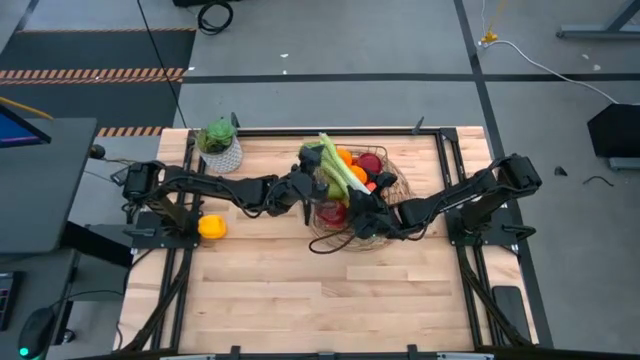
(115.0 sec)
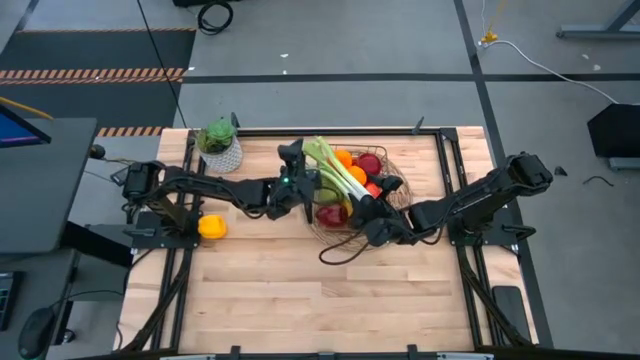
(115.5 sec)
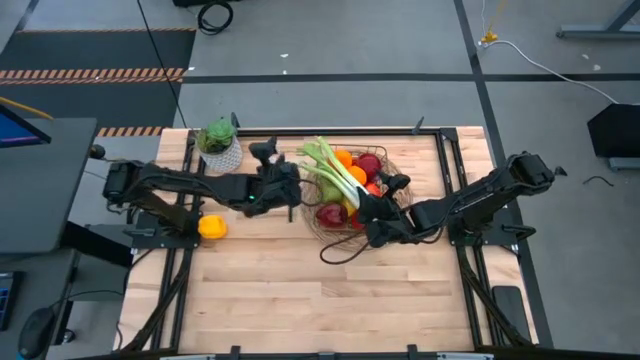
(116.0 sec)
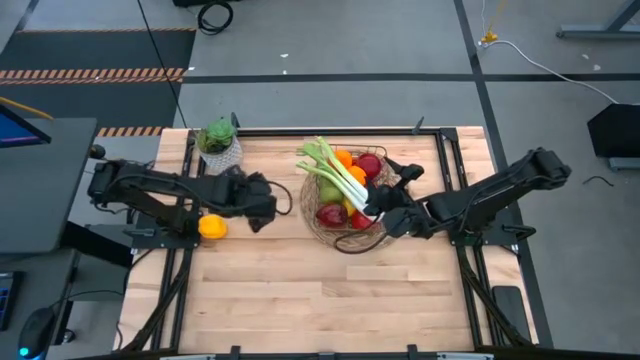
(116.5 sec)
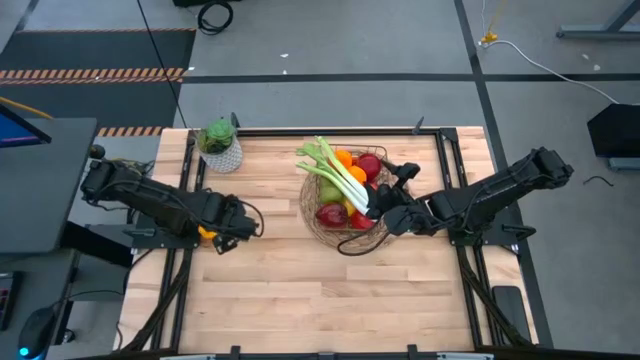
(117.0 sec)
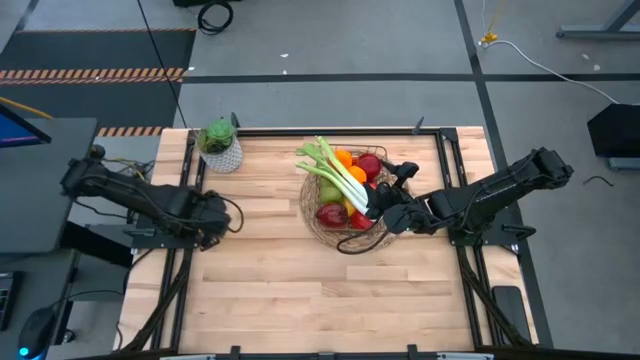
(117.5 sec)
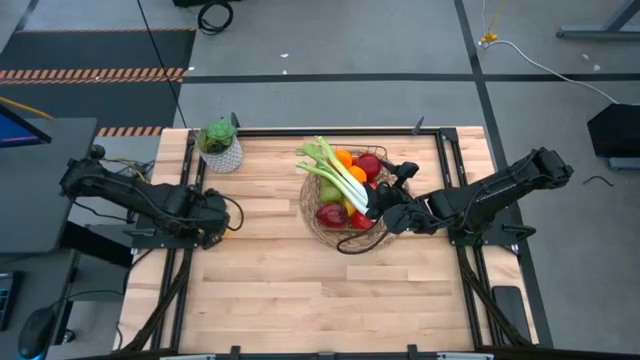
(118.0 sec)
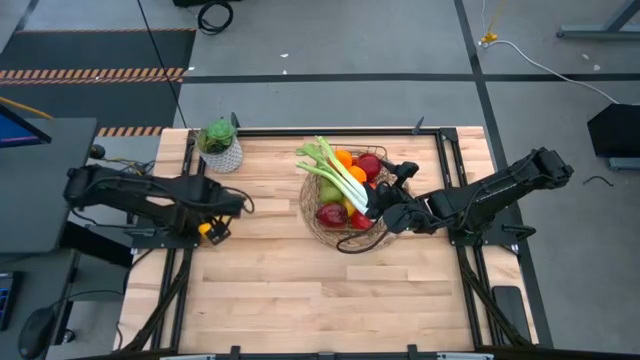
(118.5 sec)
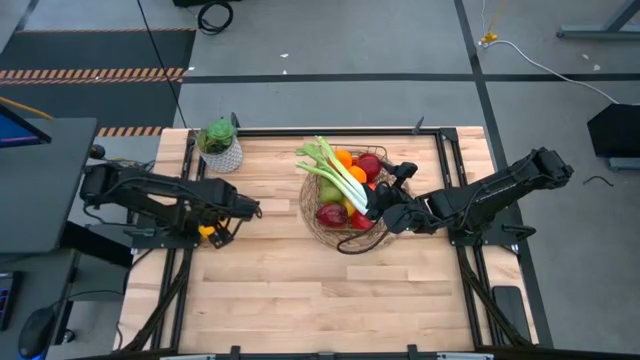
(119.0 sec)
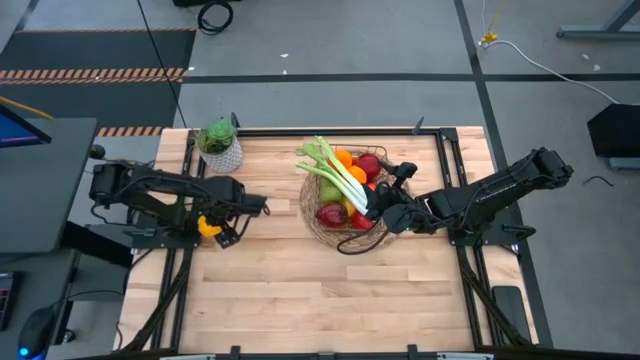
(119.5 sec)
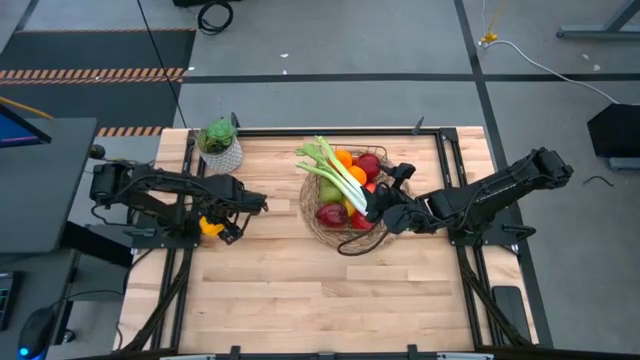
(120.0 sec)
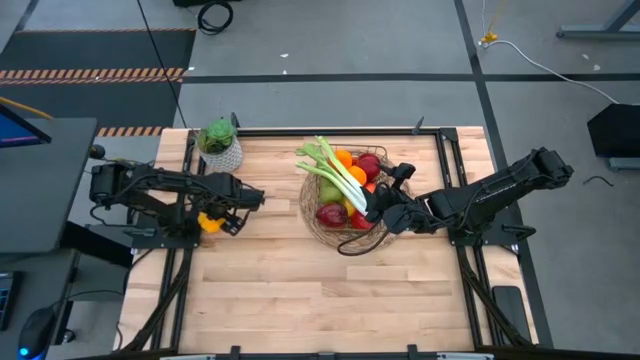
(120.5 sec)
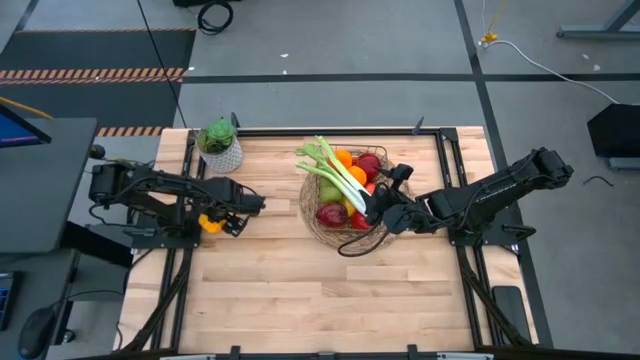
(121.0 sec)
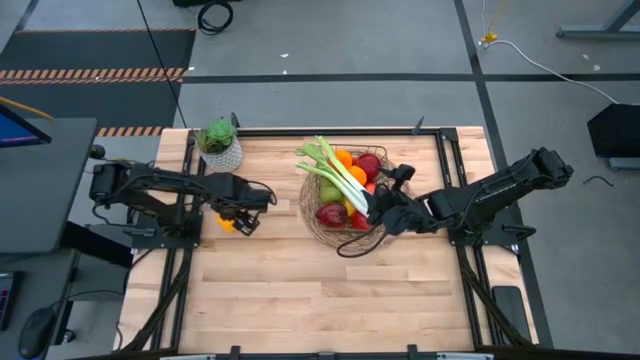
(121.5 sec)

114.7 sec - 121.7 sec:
Task: Build produce basket
Put the yellow bell pepper into the wire basket

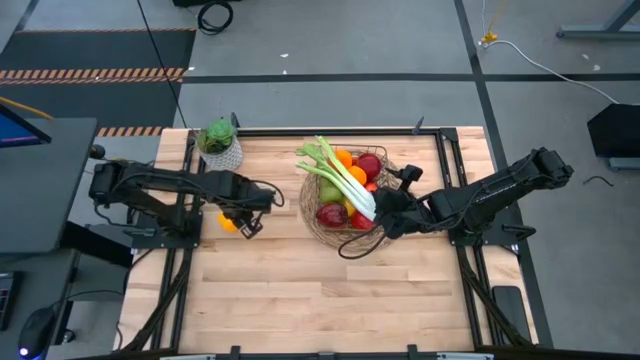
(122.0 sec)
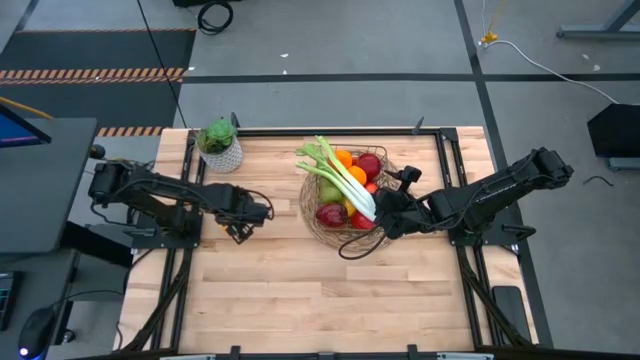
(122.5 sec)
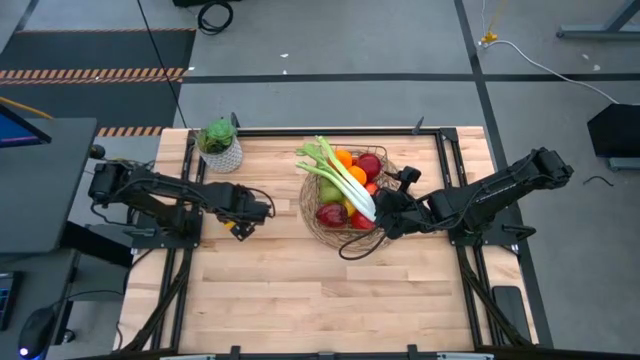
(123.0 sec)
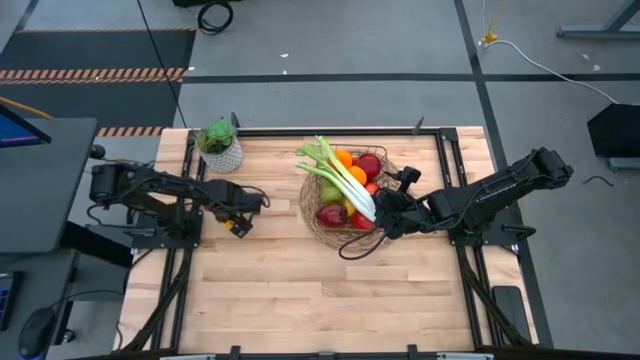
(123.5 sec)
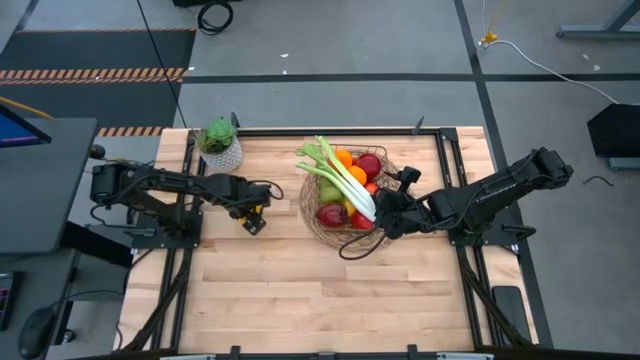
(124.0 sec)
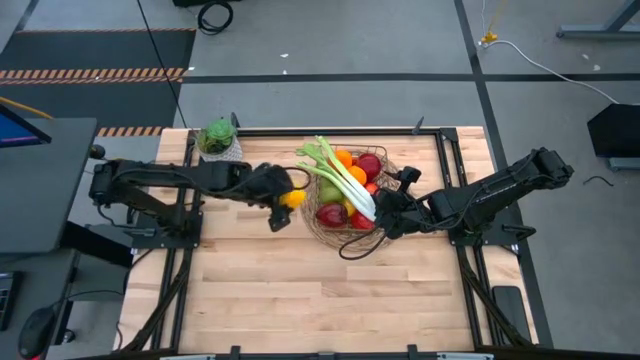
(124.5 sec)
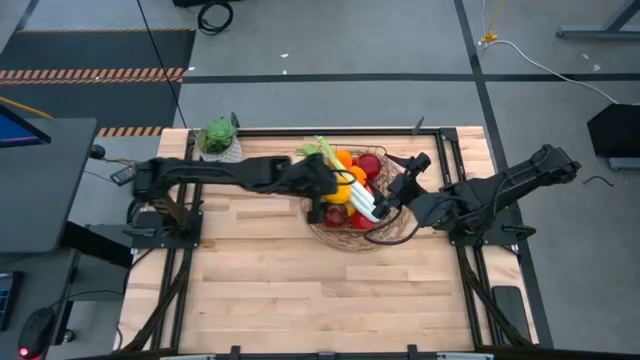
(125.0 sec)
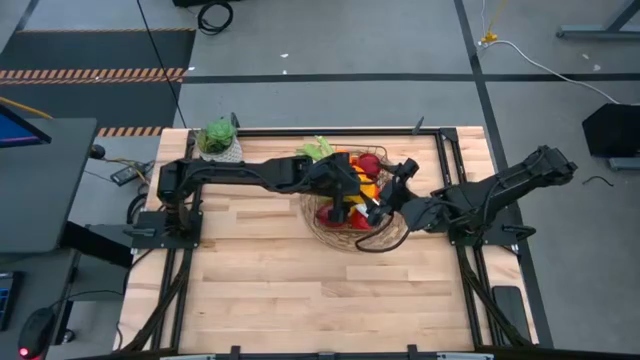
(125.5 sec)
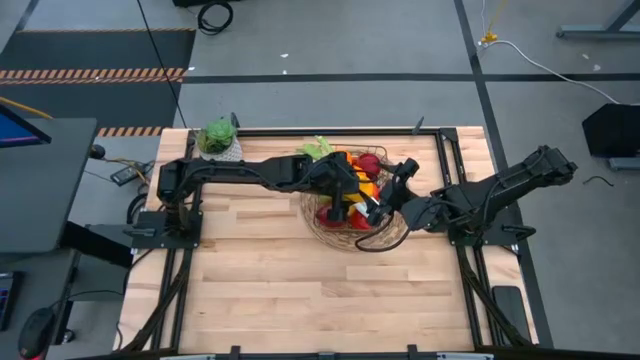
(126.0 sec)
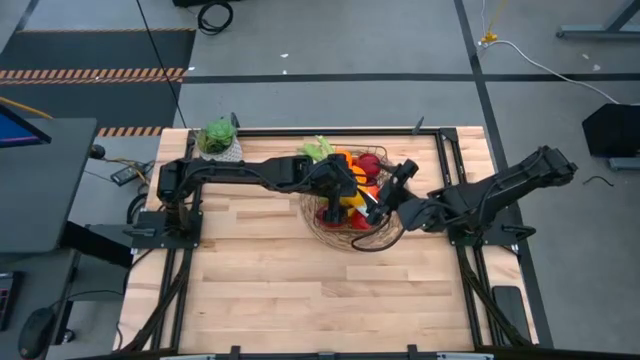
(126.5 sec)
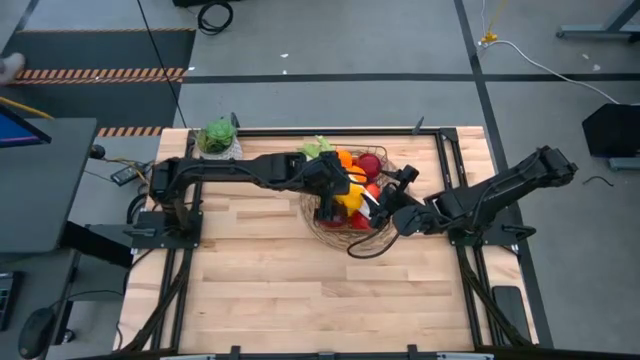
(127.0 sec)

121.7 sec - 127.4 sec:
Put the yellow bell pepper into the wire basket

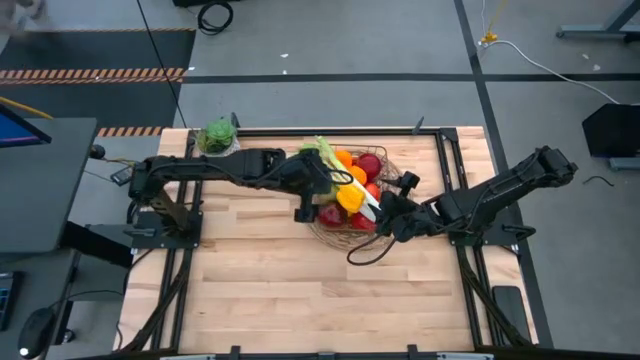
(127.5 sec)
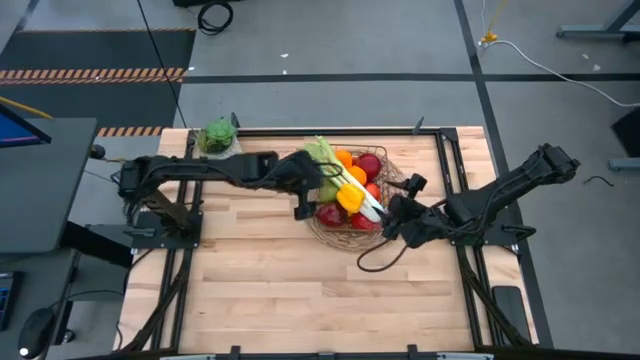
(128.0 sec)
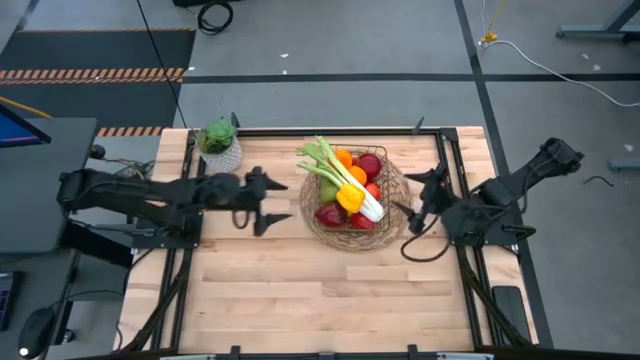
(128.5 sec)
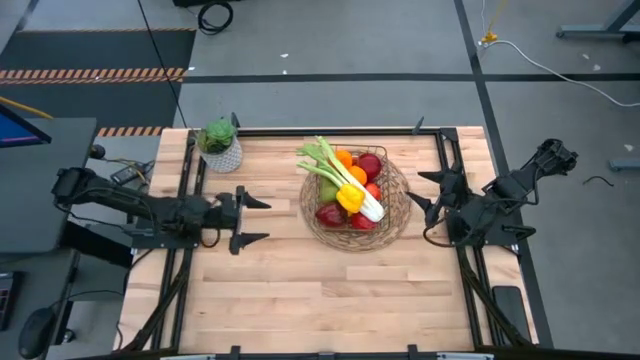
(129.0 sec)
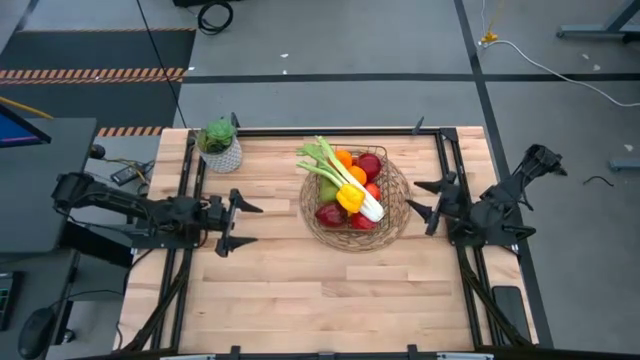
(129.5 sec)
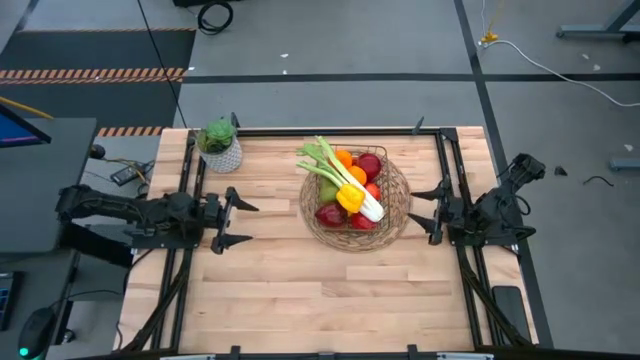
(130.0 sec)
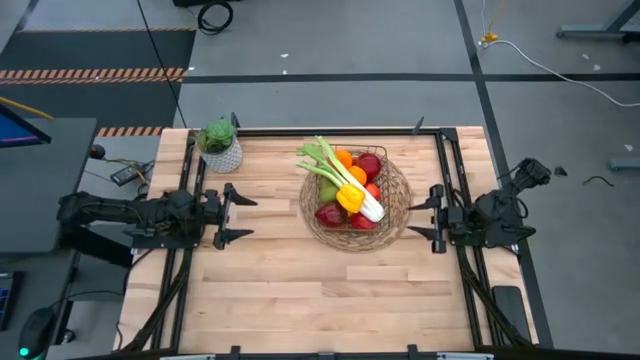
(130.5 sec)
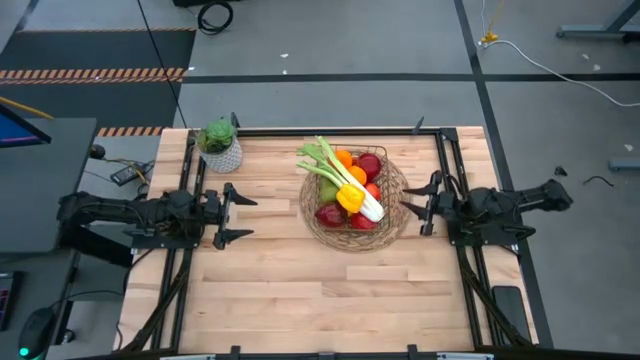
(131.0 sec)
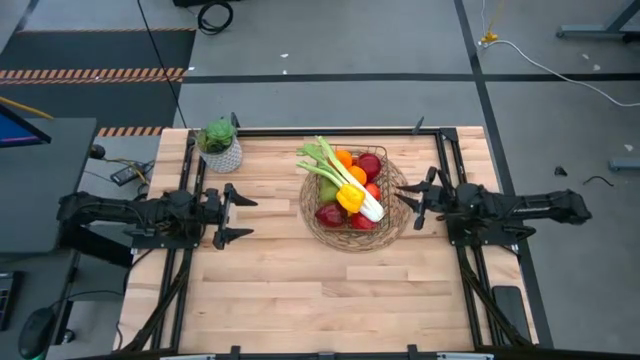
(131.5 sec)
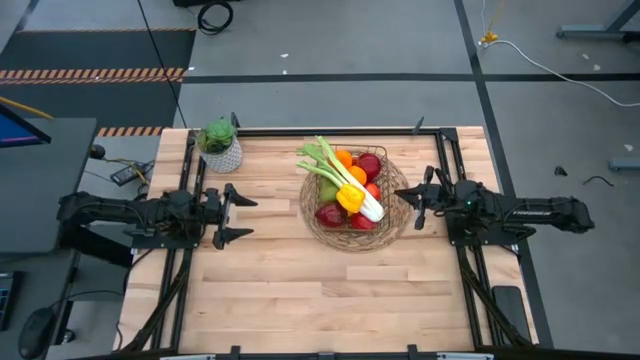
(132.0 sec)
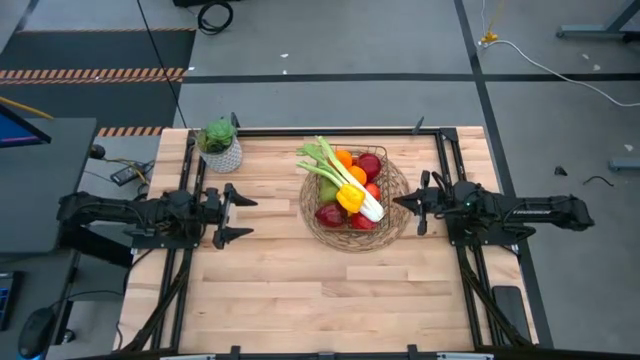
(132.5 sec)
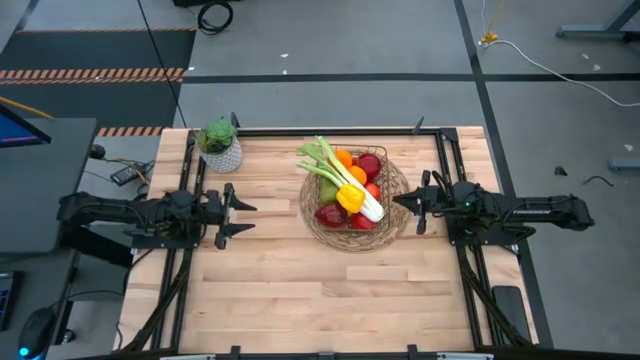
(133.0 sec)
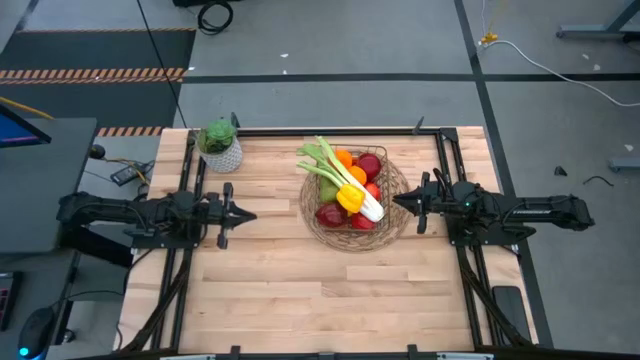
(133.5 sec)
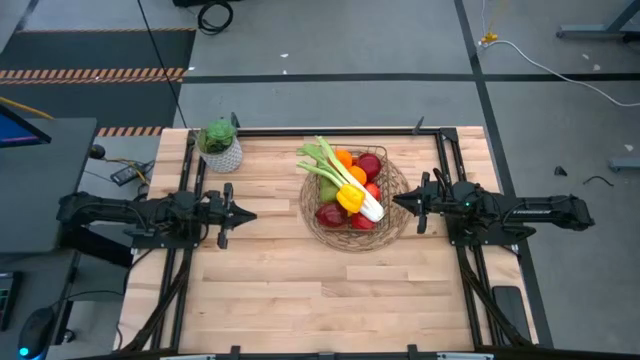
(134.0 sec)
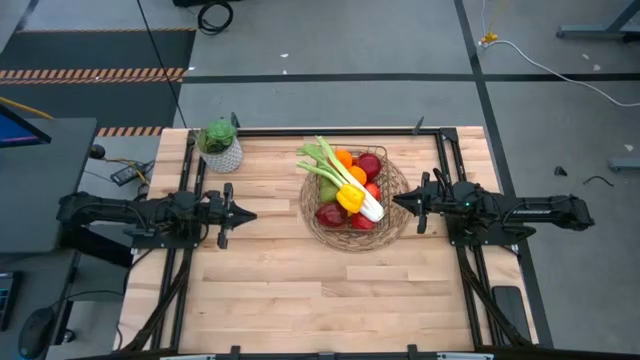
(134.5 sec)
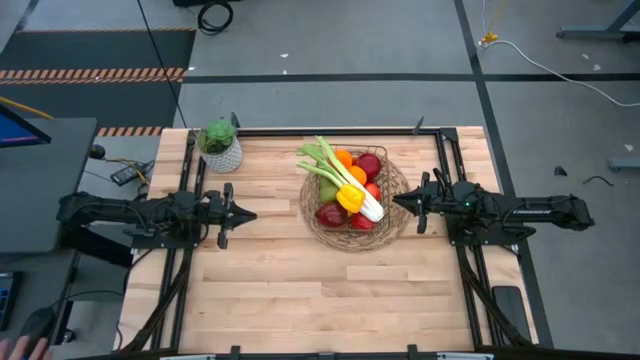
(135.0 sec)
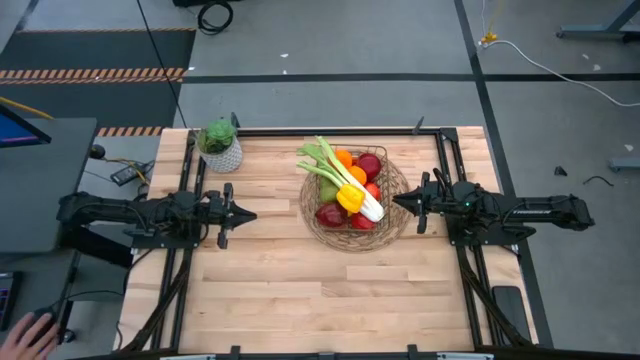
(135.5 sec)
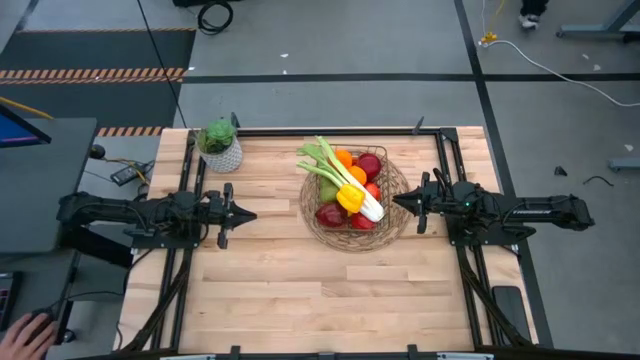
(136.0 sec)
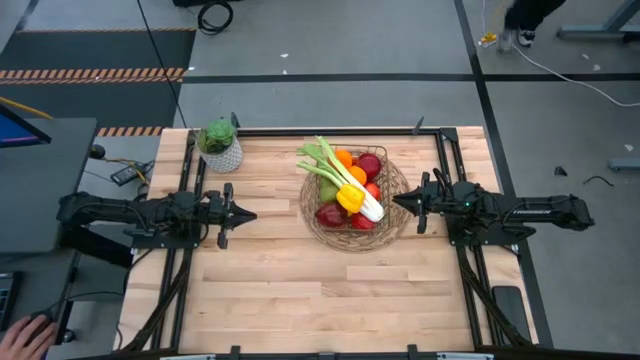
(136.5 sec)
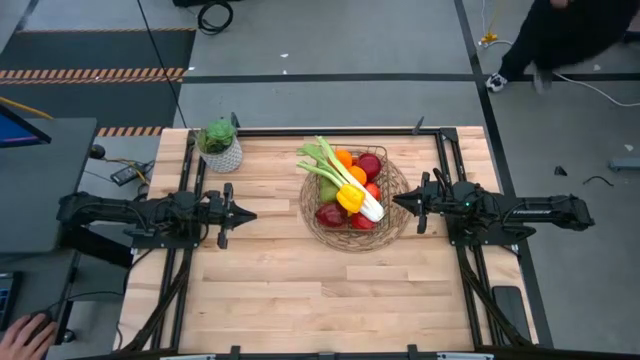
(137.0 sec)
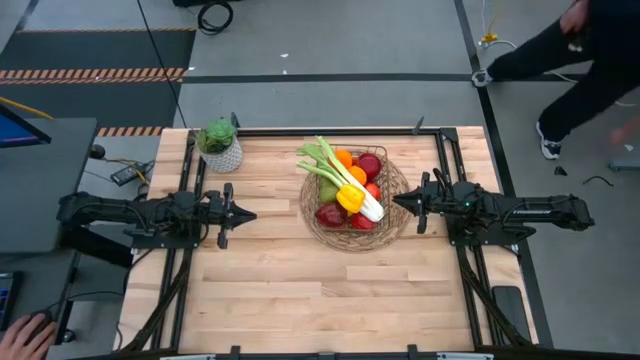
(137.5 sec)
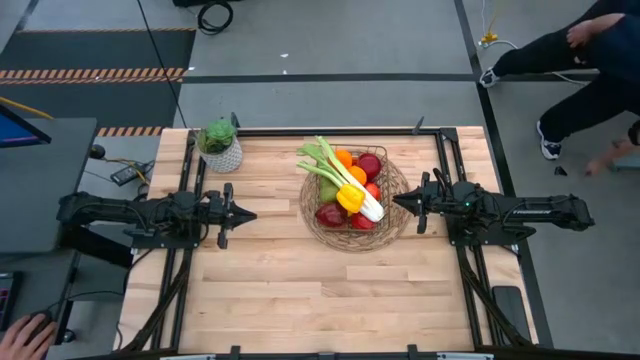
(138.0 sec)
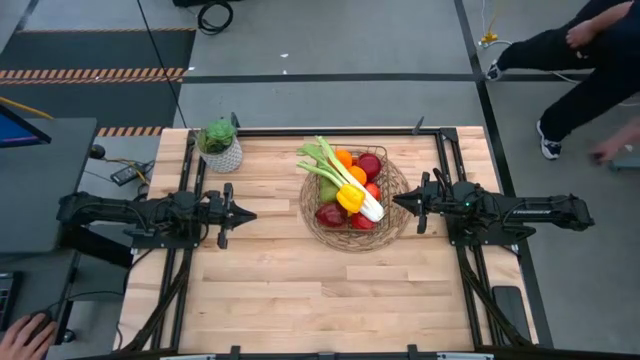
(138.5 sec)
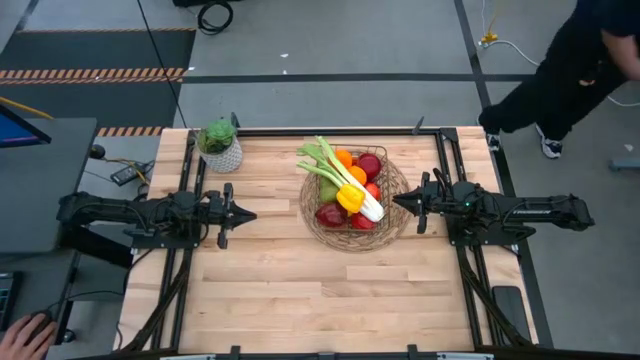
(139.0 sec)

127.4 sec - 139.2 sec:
Return to home position
